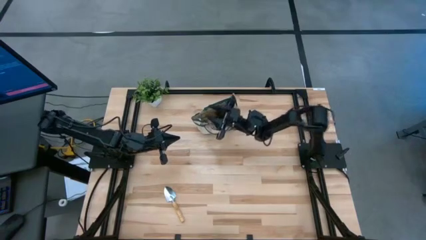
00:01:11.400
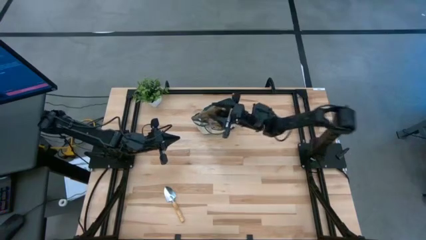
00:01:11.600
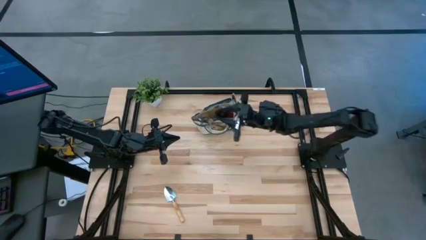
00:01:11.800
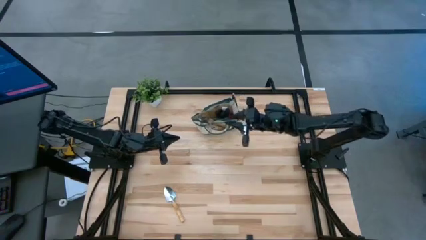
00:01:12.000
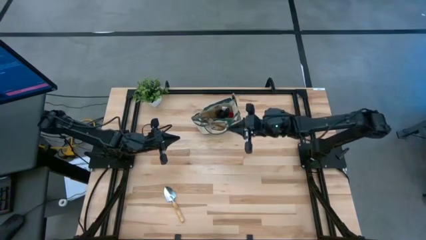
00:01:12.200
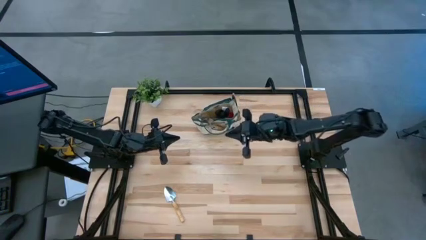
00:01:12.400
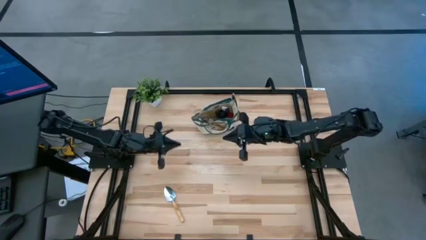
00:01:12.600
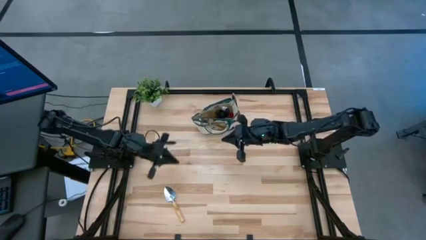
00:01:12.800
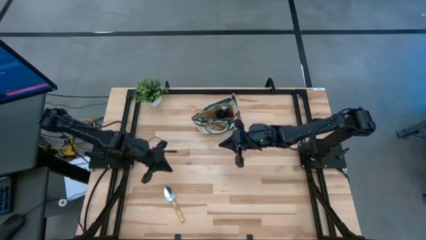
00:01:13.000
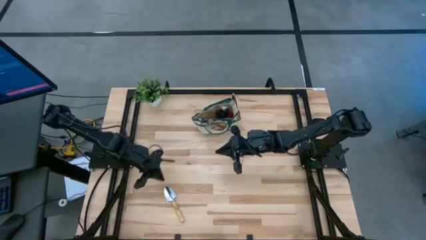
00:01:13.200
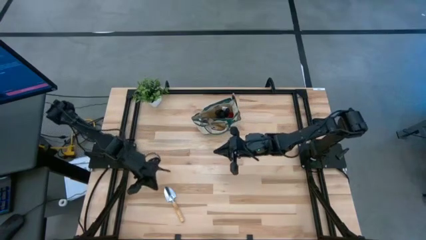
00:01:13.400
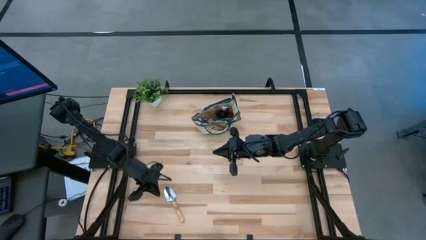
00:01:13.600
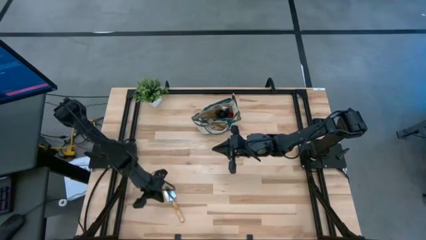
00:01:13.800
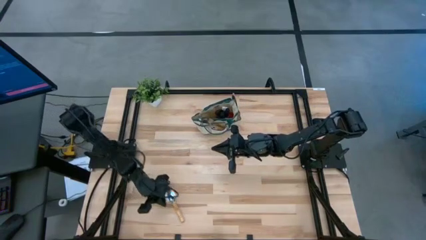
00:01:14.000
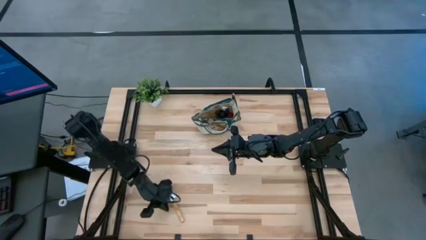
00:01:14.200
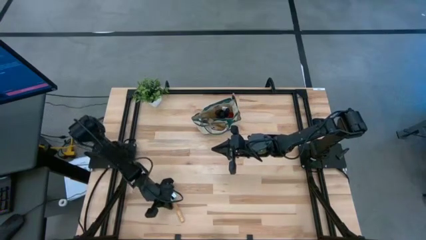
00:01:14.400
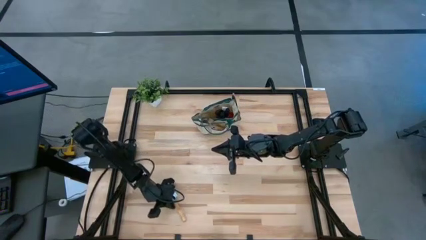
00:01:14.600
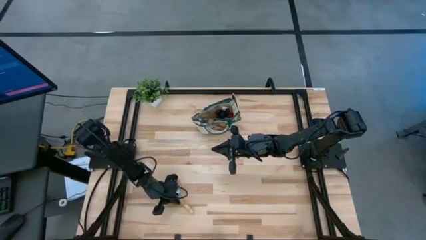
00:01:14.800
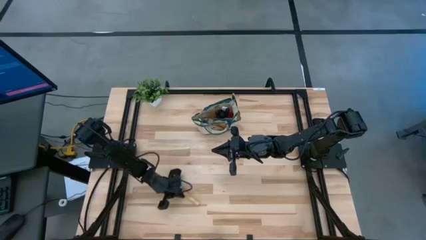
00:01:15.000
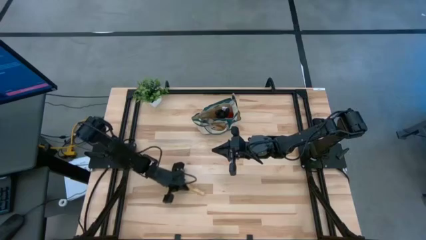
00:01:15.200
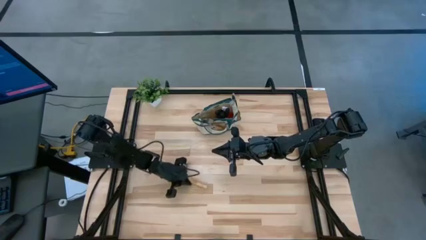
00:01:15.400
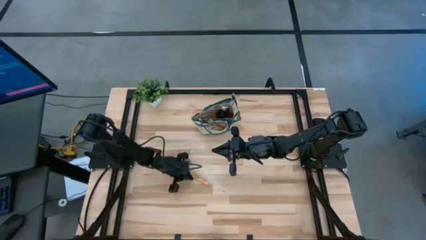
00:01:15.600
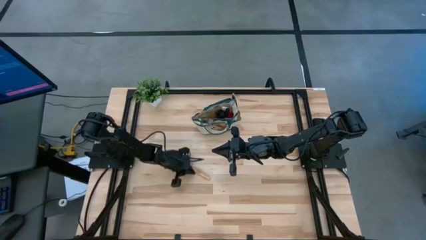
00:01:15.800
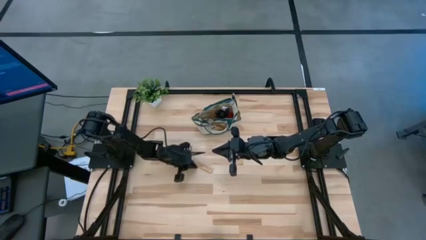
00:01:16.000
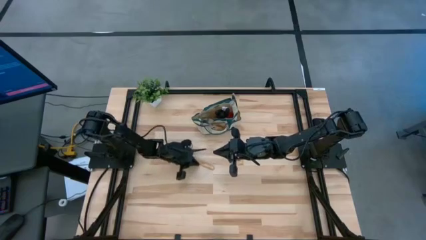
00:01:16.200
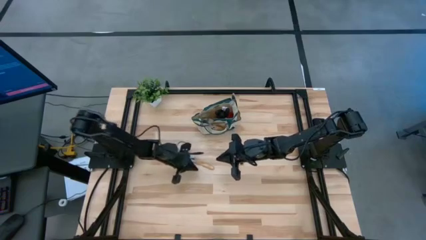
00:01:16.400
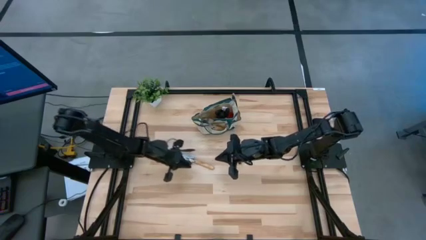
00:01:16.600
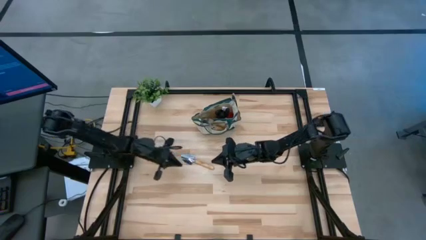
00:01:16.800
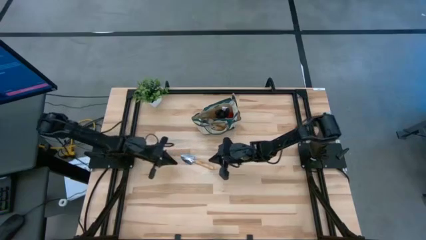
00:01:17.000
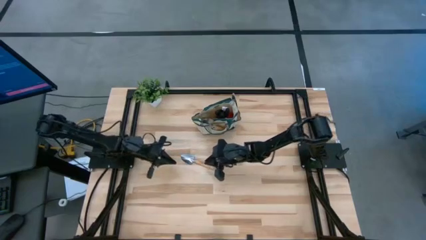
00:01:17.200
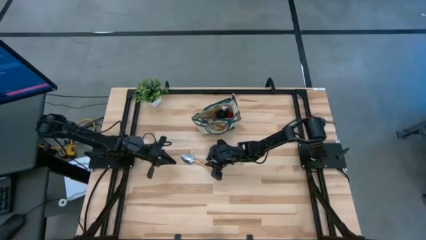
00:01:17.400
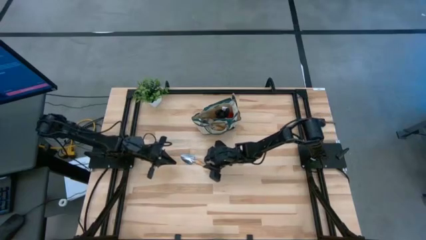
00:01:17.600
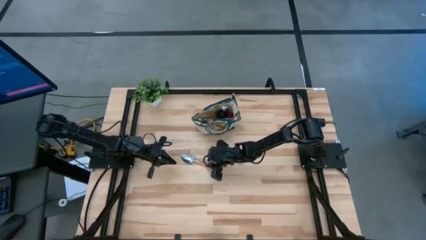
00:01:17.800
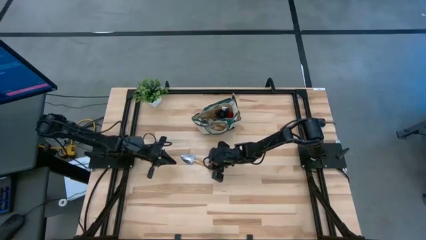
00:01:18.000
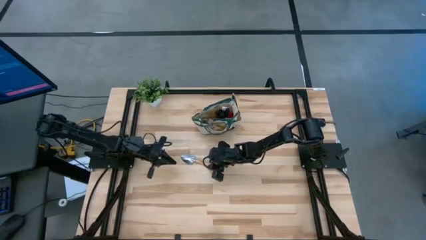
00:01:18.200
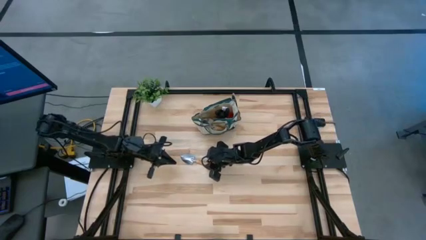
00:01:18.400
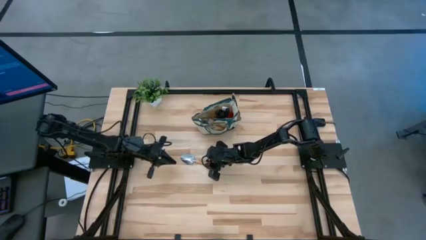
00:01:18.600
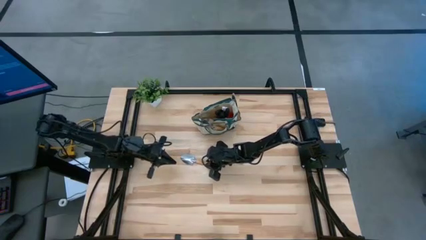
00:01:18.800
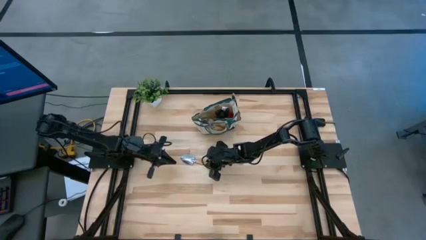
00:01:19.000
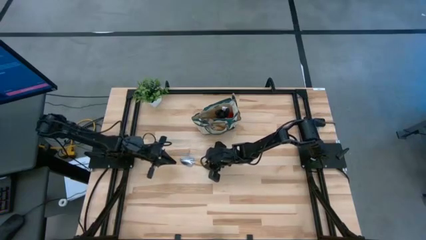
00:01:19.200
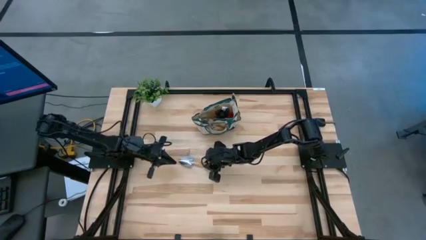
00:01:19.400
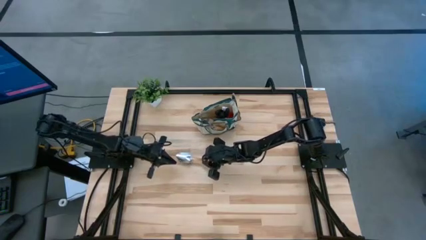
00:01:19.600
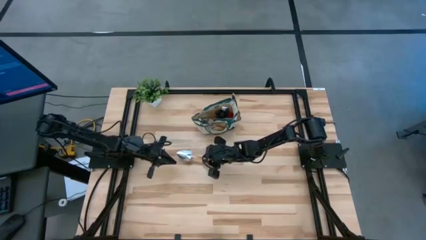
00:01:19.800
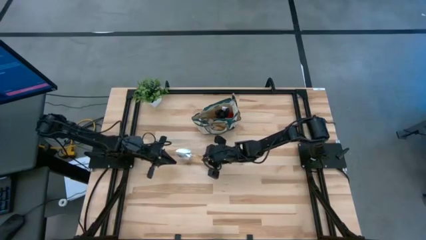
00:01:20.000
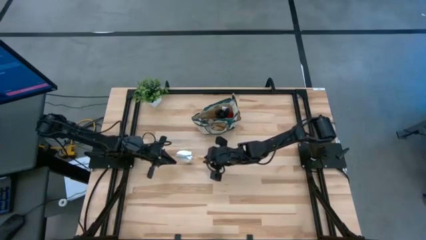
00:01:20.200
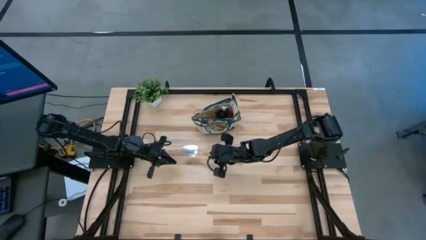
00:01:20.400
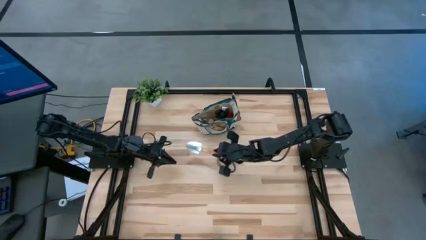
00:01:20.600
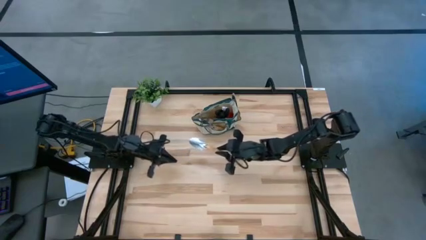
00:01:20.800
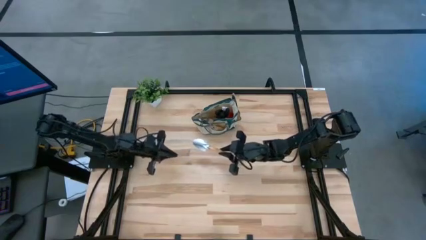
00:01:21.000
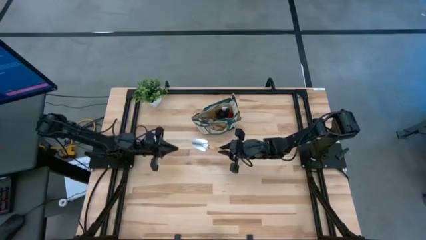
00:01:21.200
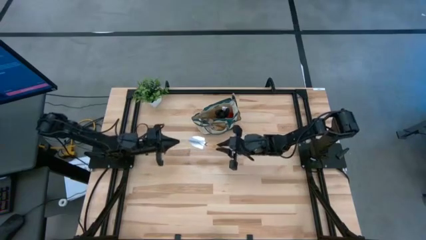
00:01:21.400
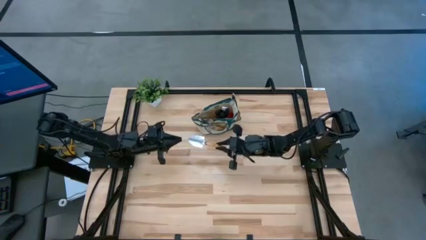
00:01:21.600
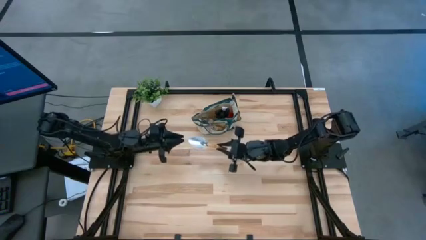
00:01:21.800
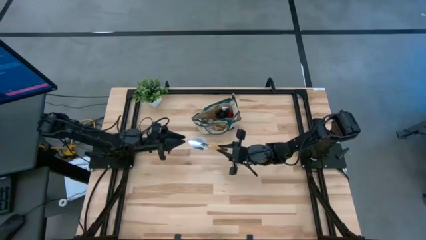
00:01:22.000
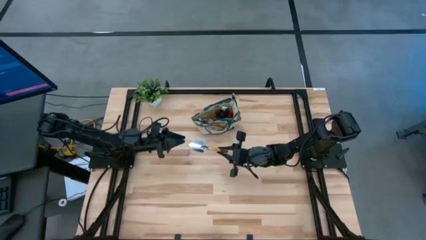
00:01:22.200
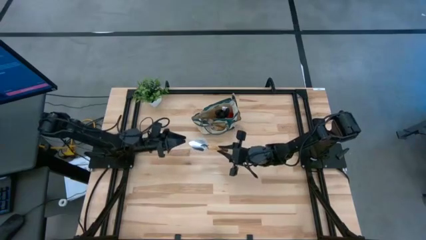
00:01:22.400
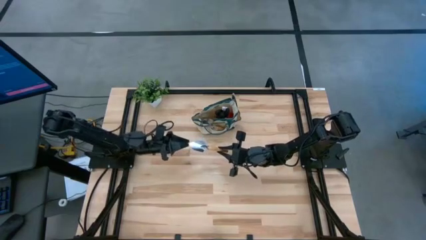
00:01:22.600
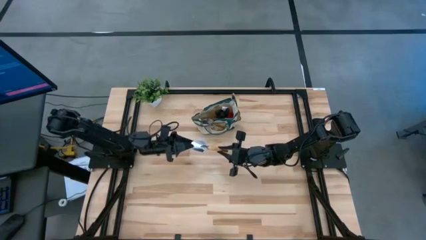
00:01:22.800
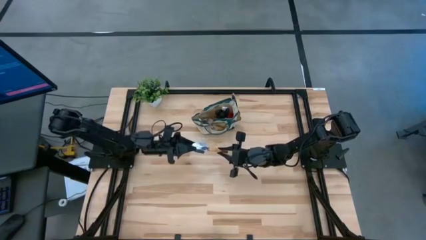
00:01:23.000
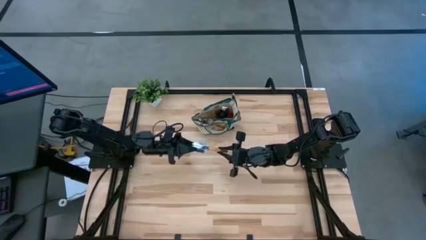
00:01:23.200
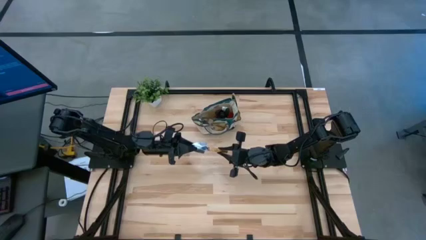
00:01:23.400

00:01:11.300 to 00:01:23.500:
Task: Pick & Place Garden tools in Gardening bag
Put the trowel into the gardening bag

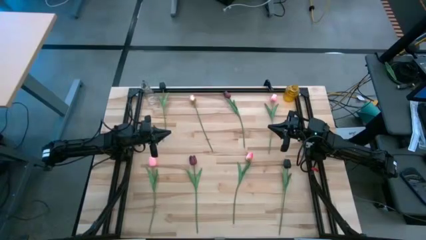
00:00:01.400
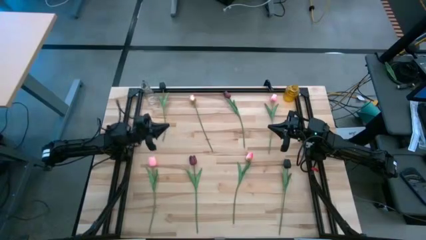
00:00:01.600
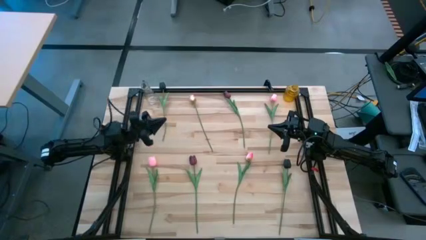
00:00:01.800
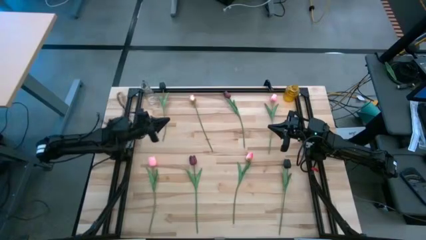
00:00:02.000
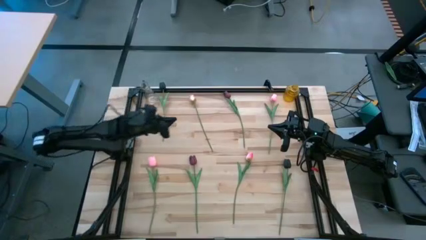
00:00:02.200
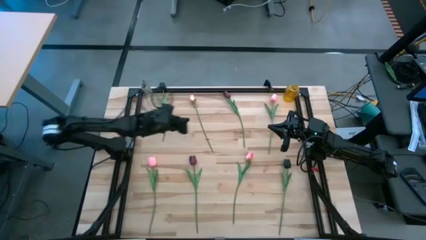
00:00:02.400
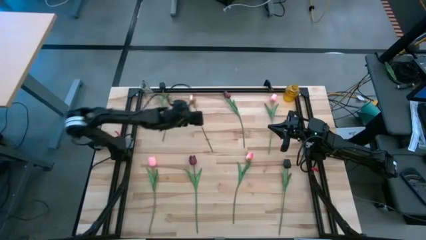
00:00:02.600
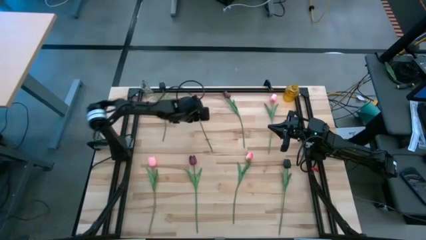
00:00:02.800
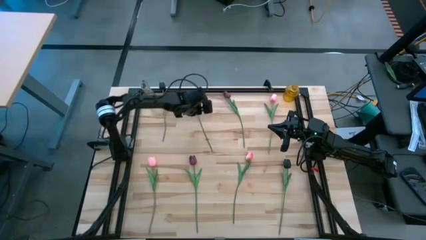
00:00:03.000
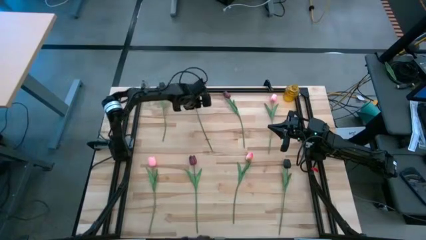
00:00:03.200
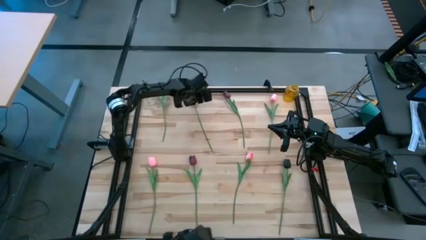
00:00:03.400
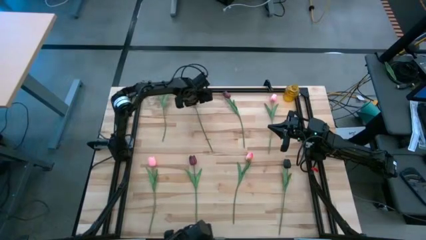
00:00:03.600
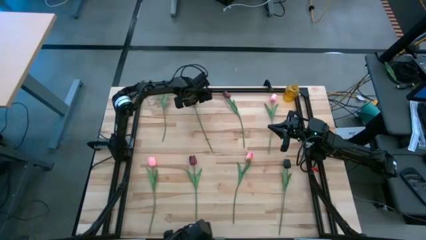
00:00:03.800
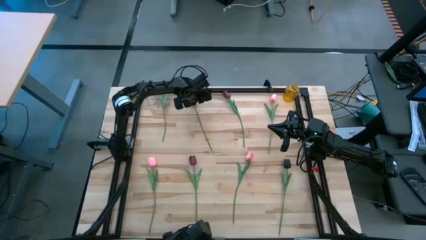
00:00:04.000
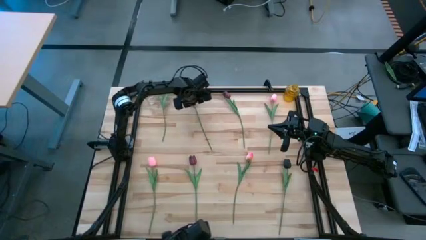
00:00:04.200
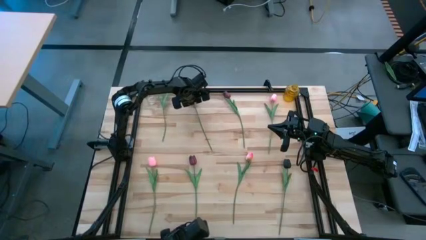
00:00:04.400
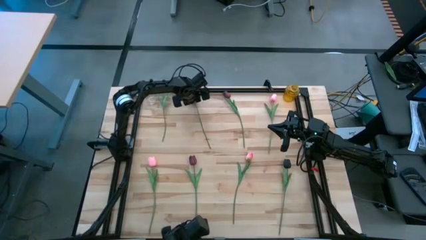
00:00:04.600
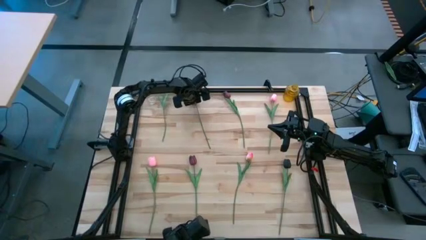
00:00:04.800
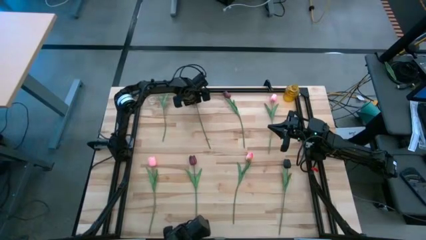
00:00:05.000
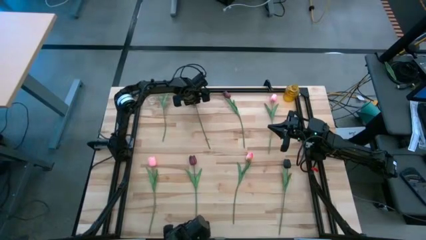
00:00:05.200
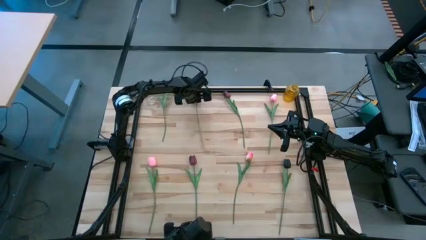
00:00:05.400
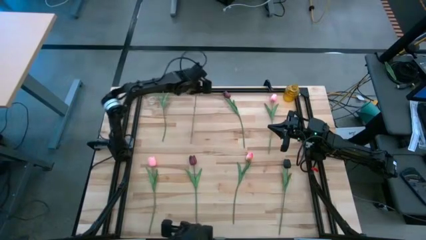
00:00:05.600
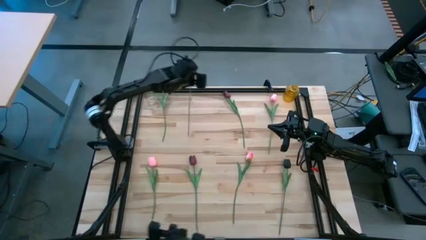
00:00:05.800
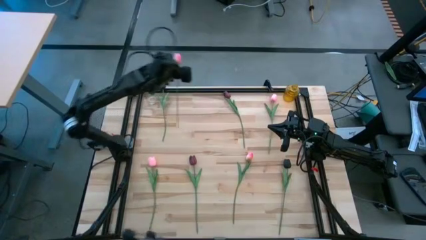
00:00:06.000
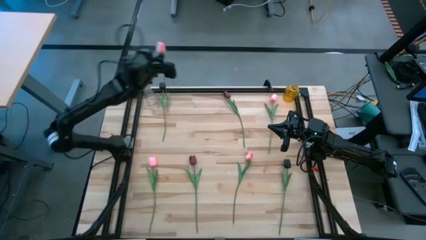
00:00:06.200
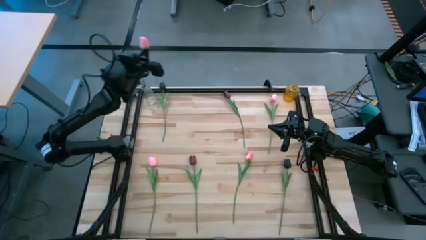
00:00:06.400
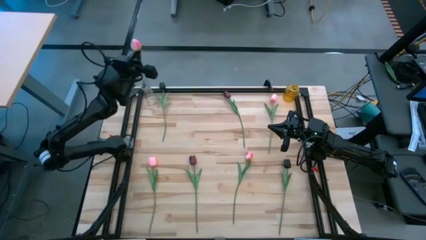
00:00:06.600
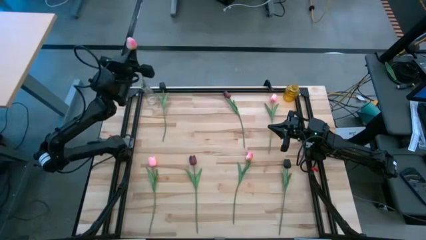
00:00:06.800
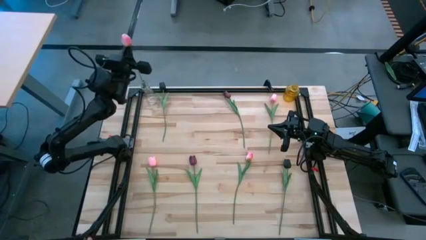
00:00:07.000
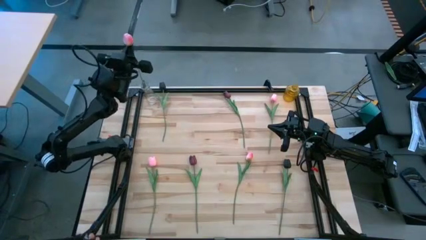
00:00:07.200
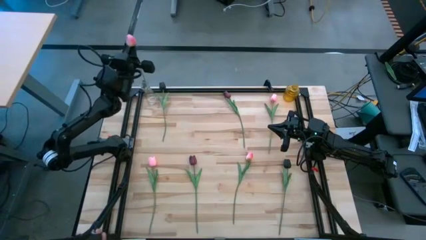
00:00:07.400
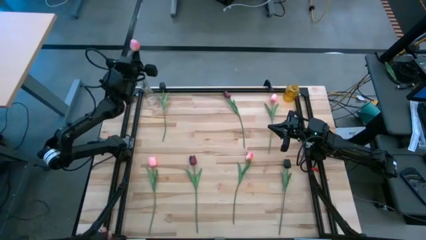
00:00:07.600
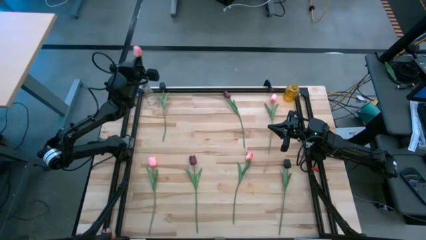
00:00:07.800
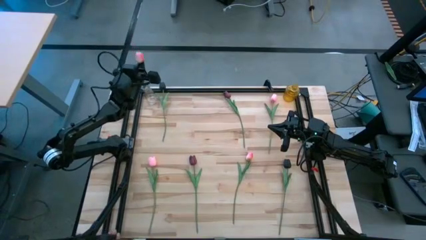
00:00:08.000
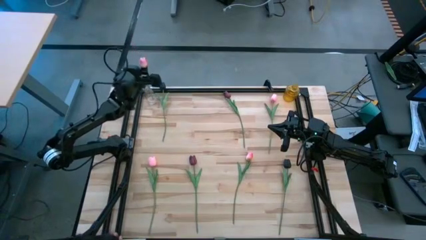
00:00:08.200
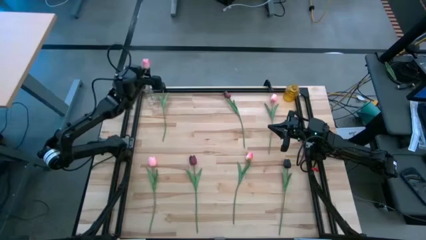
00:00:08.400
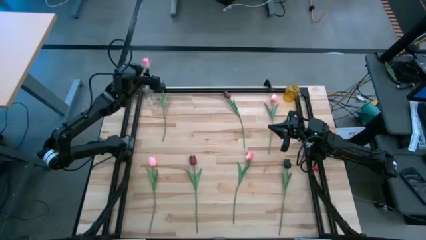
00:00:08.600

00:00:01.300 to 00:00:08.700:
Task: Sort flowers into vase by color
Put the top left pink flower into the transparent vase
